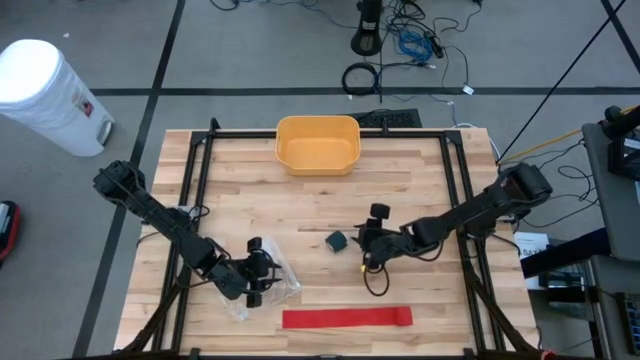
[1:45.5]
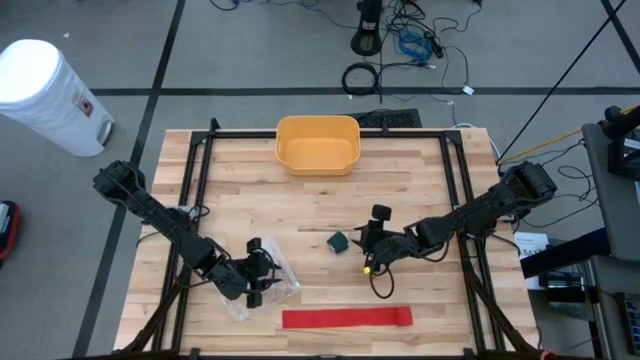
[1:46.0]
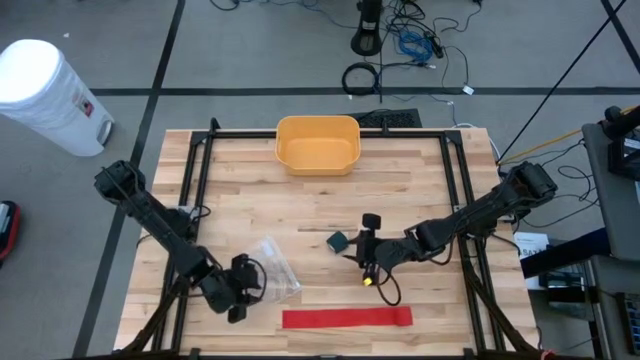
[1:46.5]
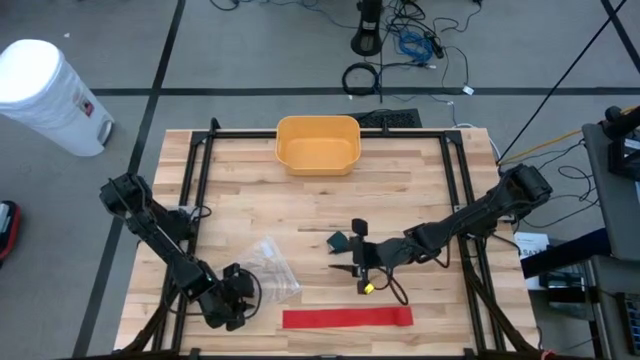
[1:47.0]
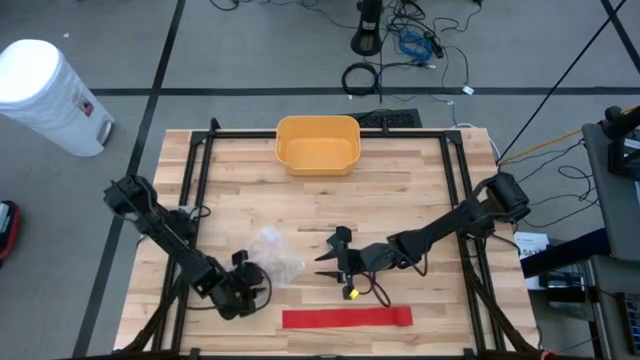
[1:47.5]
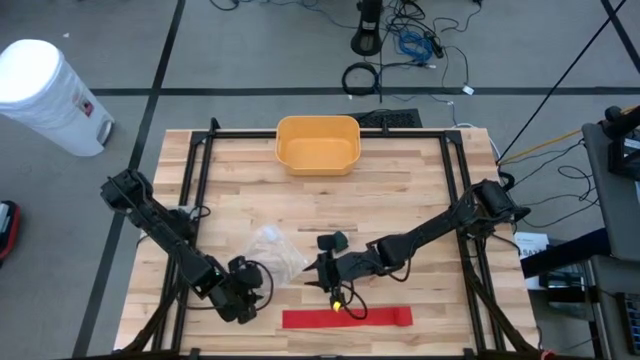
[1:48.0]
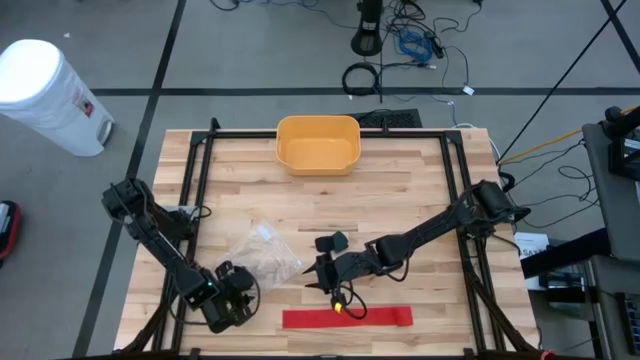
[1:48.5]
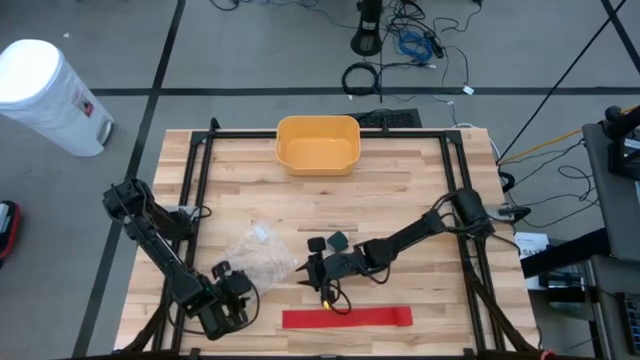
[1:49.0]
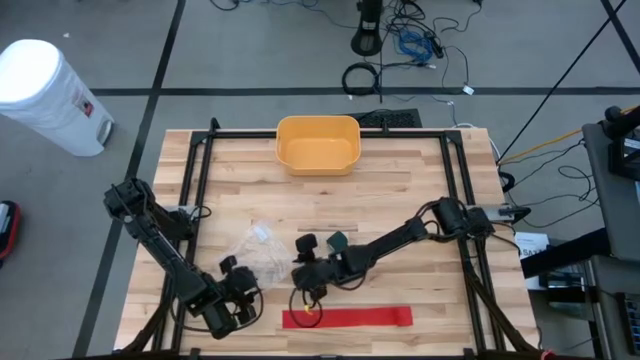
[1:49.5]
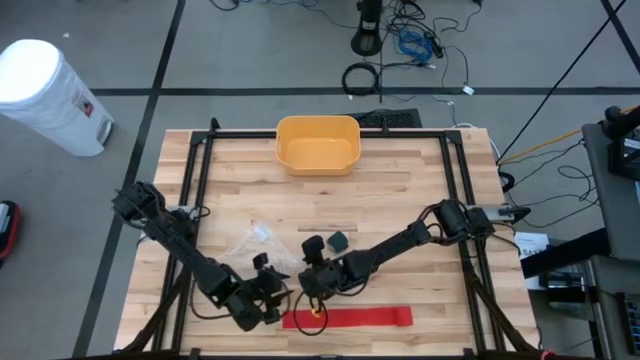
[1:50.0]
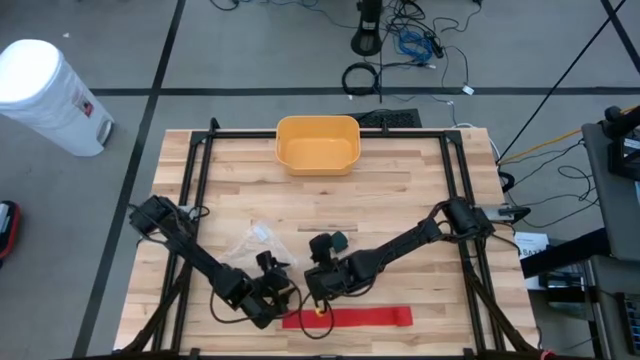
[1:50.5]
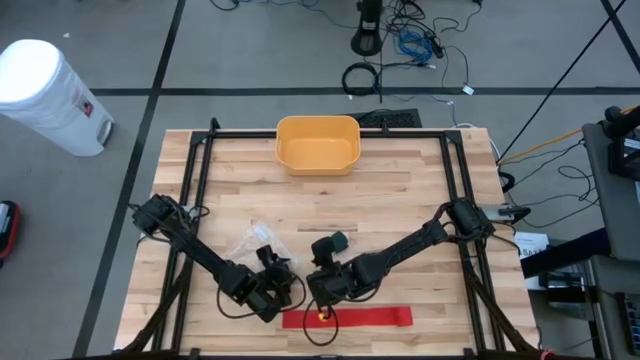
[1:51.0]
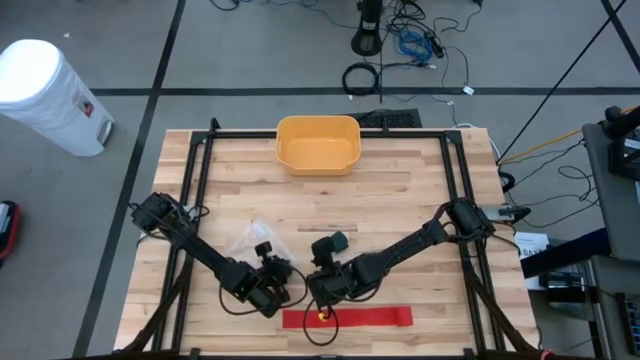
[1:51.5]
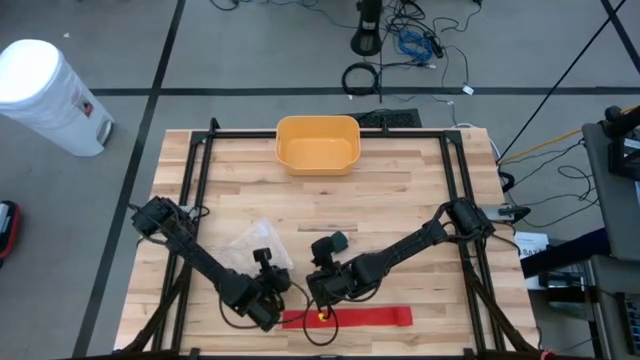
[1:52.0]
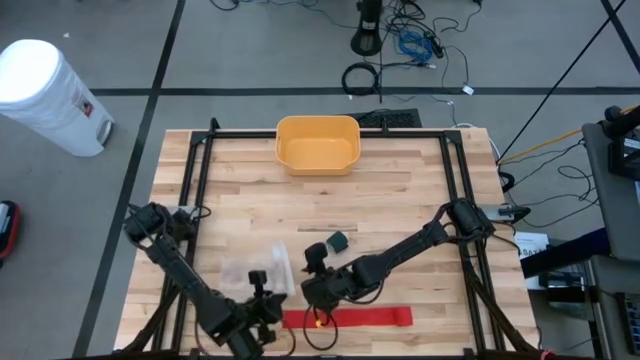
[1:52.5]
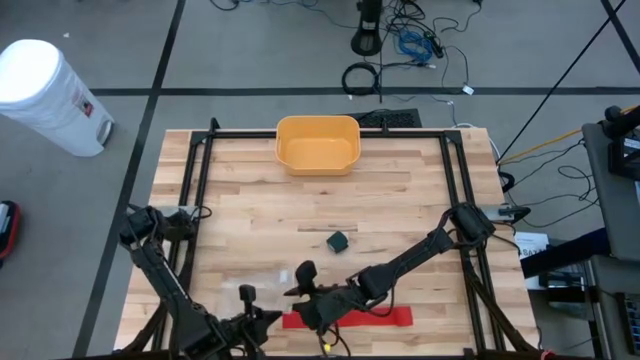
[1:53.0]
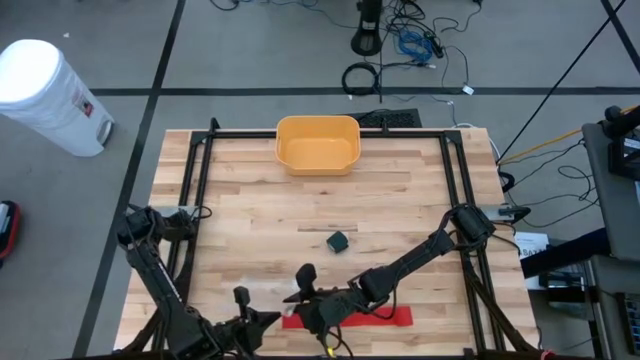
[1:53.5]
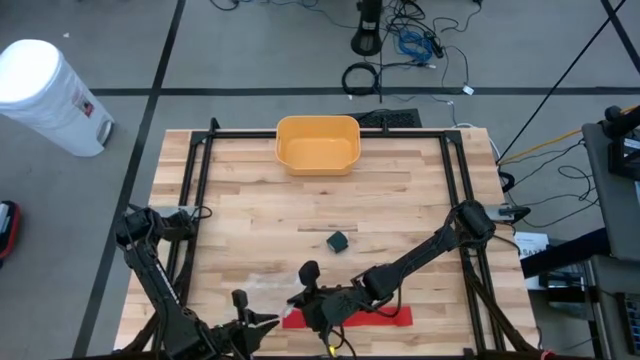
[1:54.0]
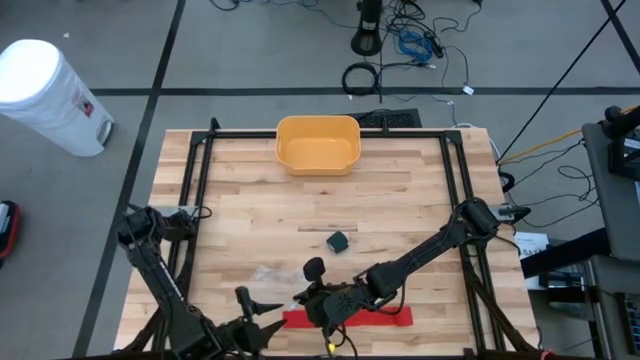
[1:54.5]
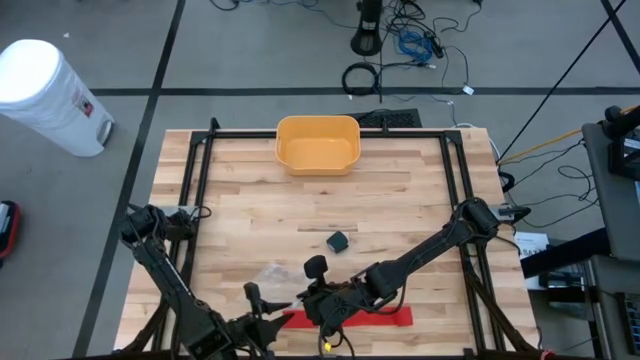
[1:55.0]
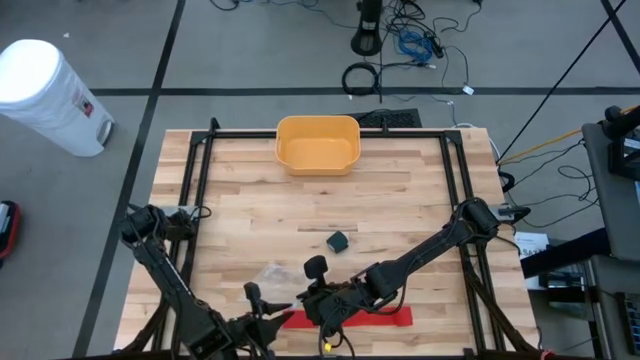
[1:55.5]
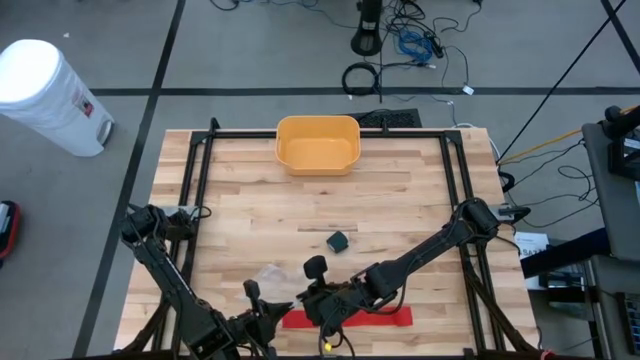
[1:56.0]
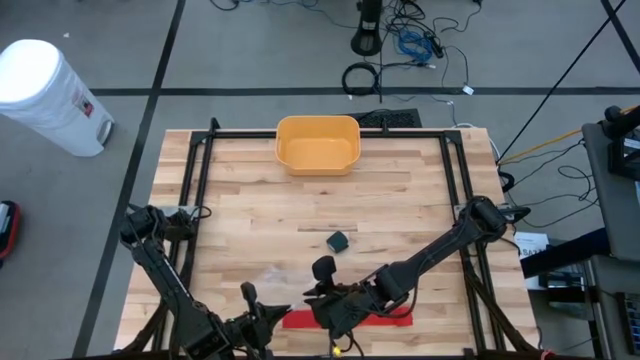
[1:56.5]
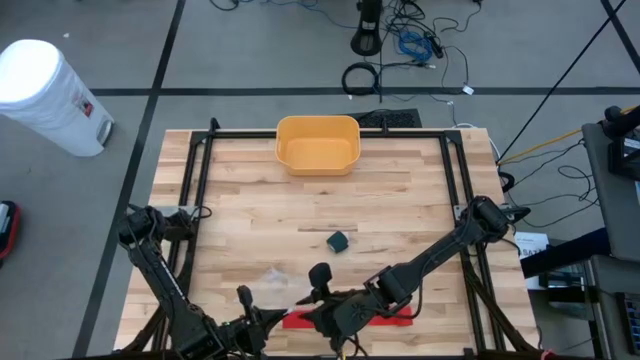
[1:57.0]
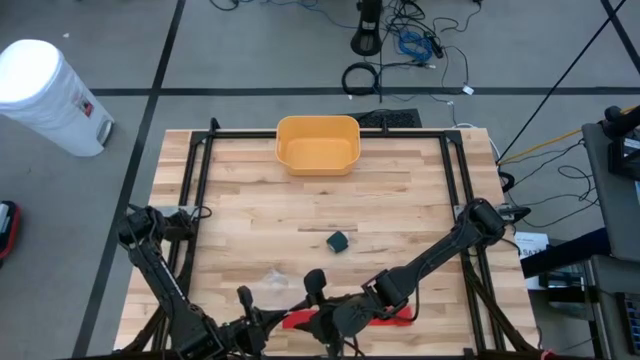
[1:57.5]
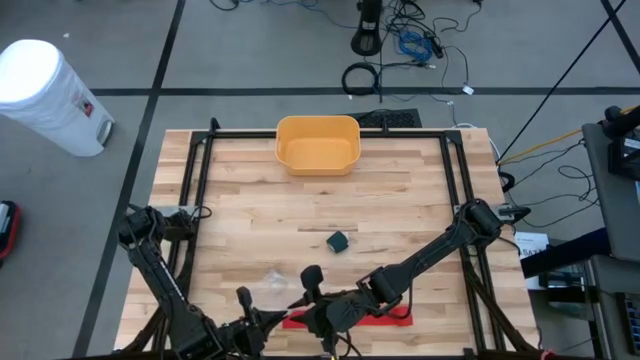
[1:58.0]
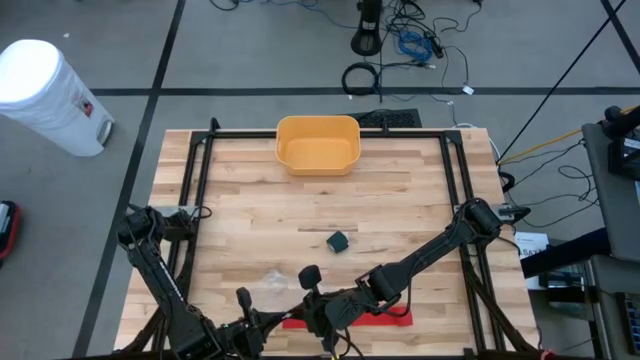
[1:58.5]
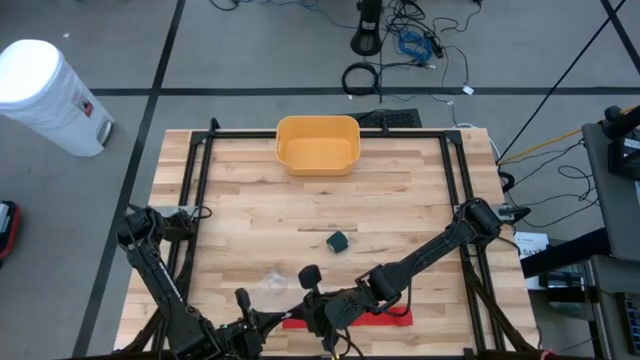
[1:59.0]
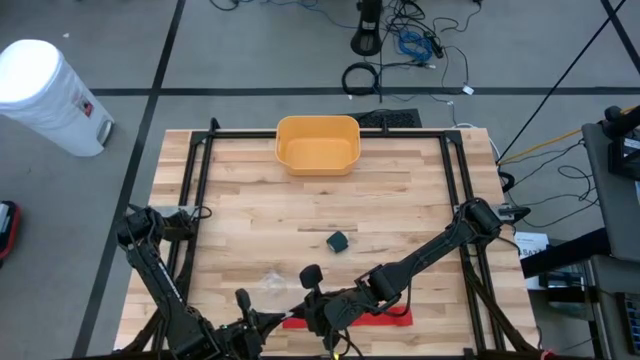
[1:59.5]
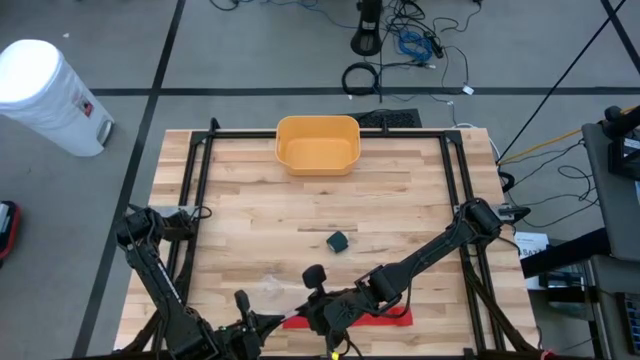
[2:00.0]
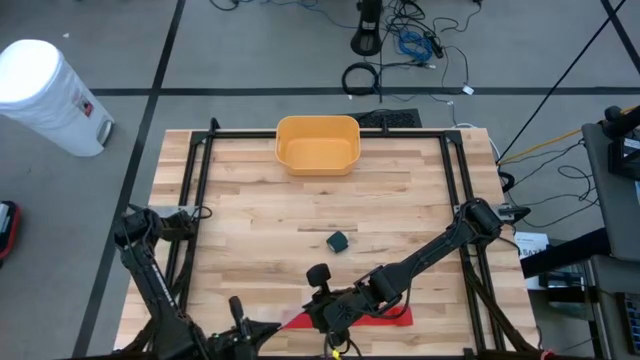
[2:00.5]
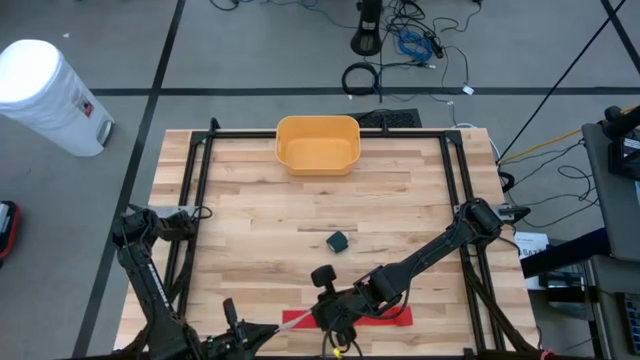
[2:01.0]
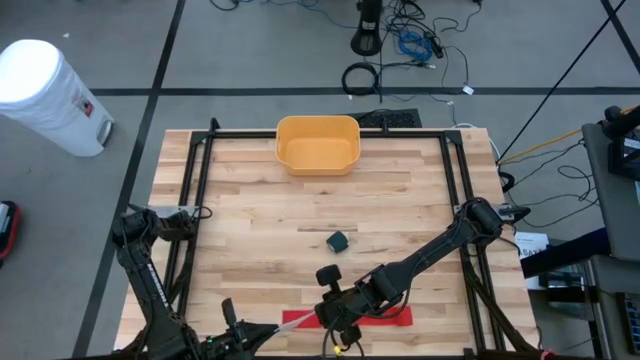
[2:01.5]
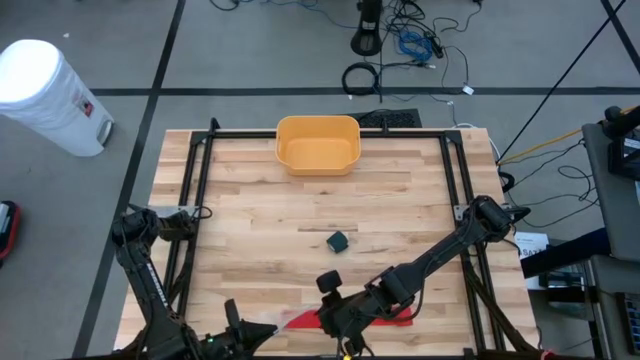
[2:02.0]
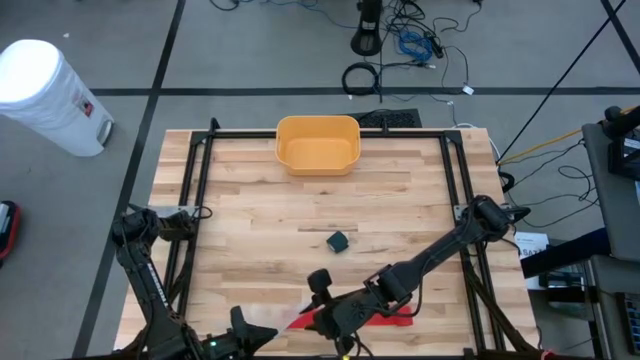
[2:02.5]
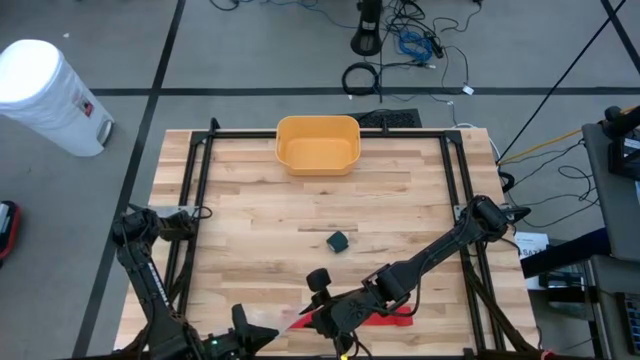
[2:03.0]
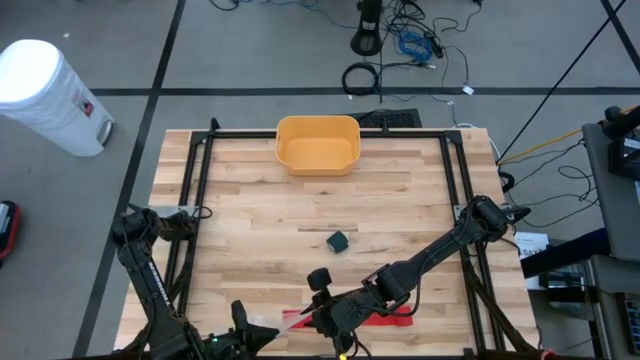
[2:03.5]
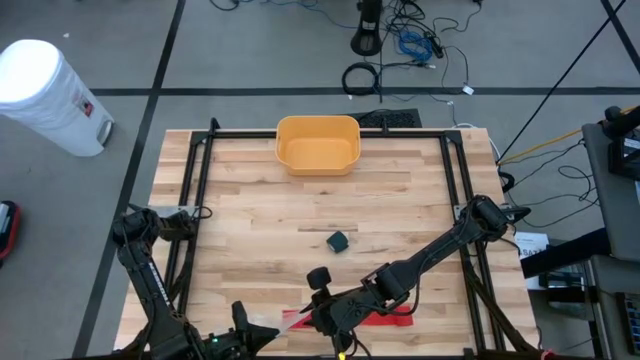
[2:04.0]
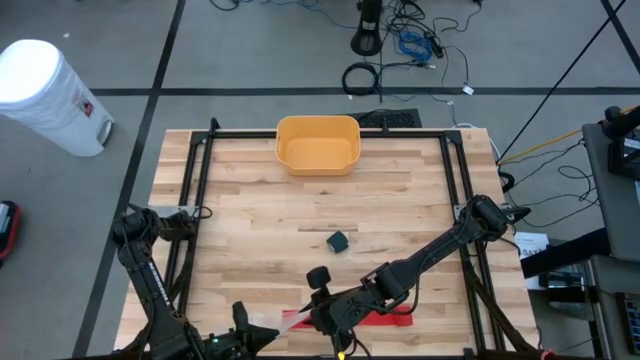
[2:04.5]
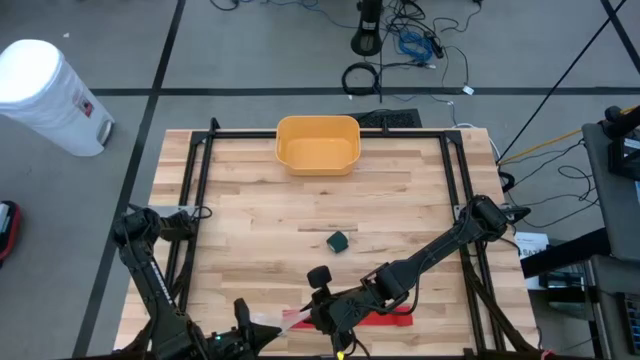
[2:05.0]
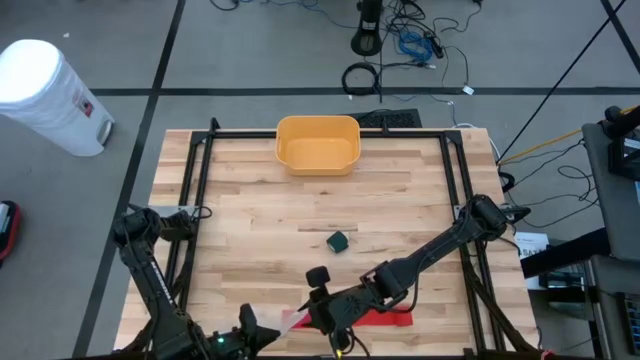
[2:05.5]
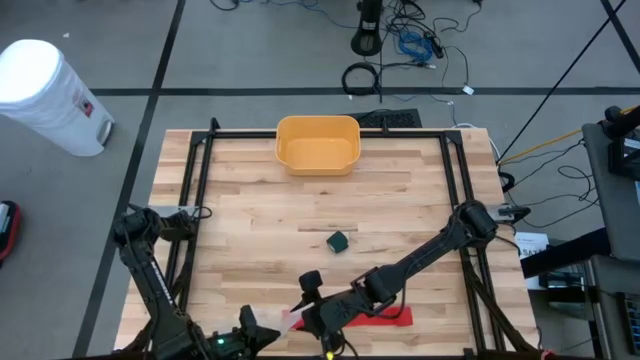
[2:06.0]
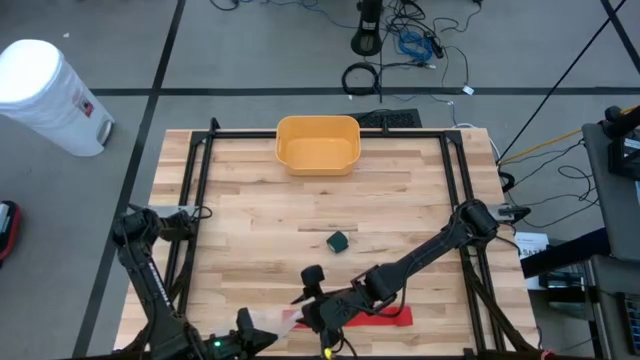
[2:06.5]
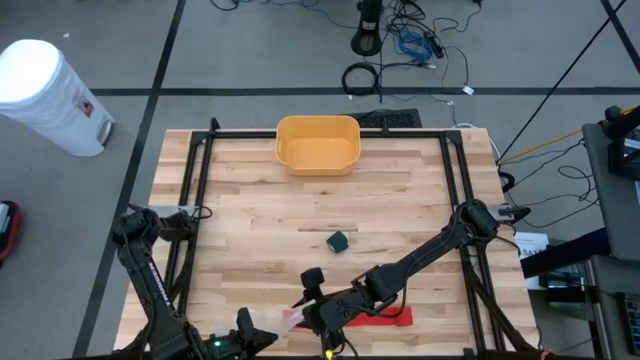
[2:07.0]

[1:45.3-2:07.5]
Task: Roll bandage
Open the transparent zip bag
